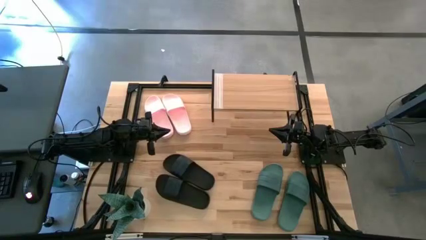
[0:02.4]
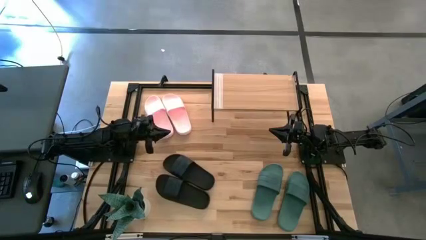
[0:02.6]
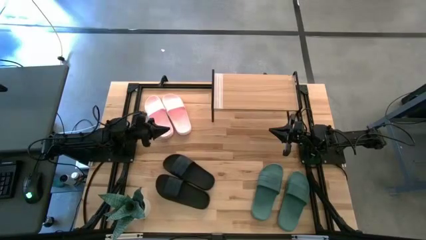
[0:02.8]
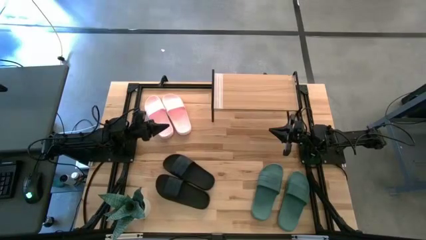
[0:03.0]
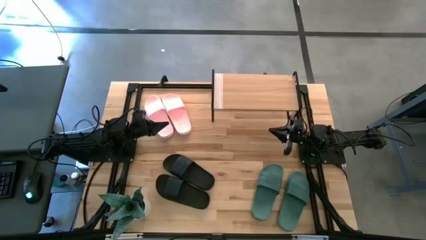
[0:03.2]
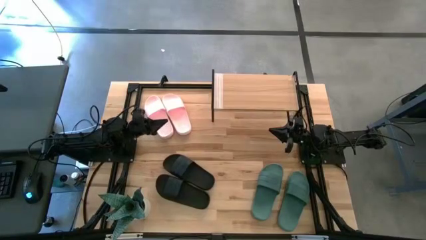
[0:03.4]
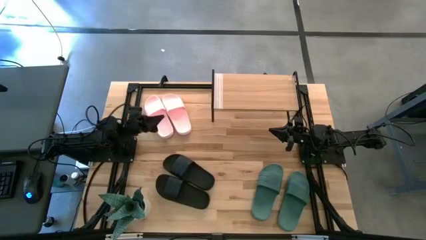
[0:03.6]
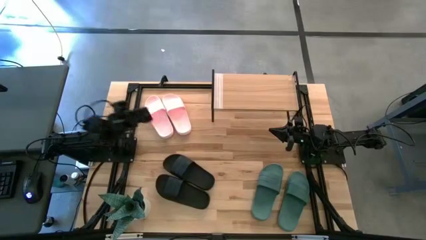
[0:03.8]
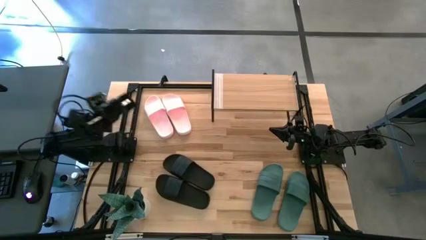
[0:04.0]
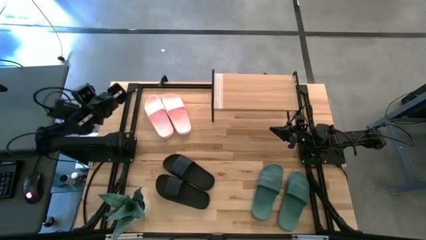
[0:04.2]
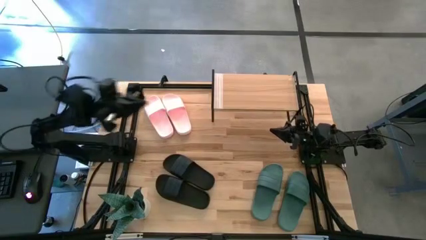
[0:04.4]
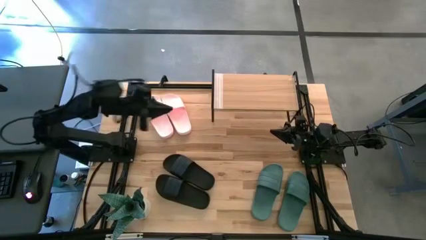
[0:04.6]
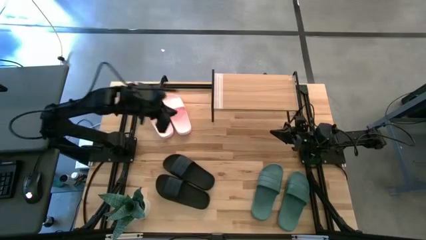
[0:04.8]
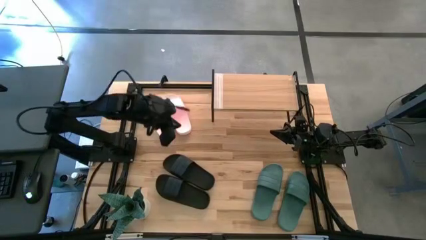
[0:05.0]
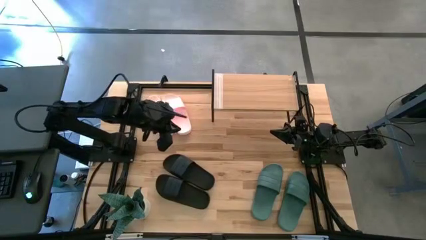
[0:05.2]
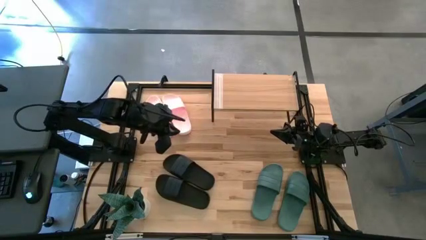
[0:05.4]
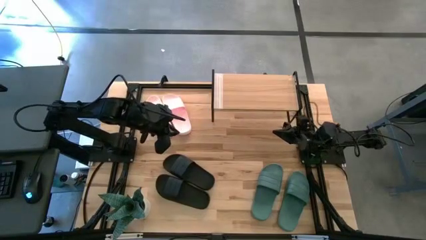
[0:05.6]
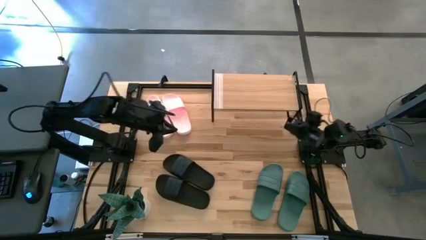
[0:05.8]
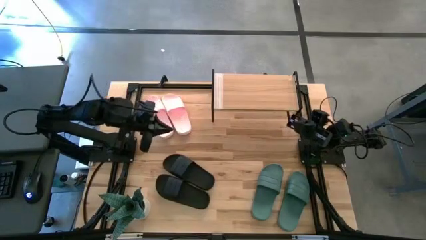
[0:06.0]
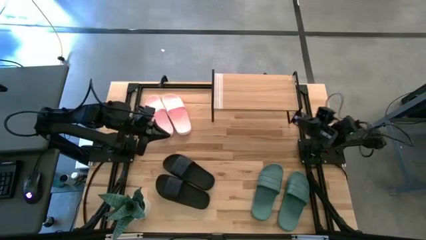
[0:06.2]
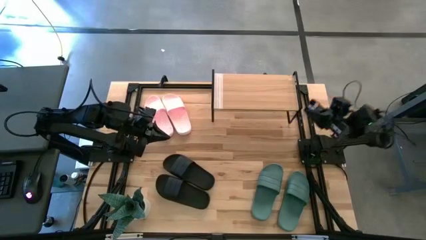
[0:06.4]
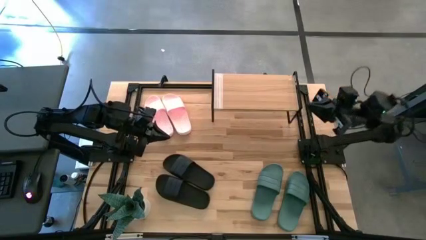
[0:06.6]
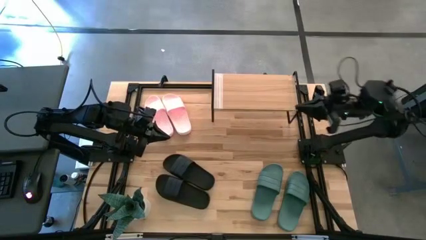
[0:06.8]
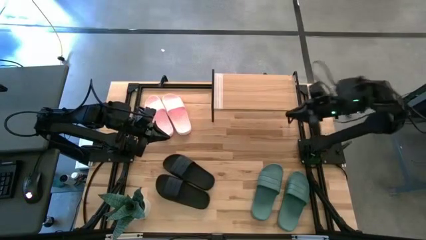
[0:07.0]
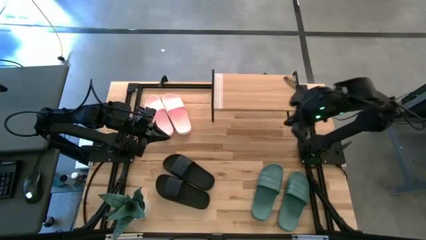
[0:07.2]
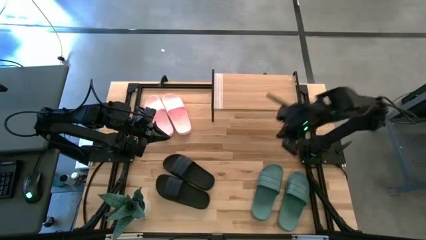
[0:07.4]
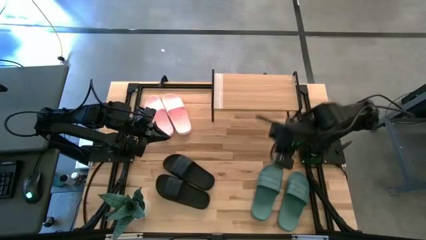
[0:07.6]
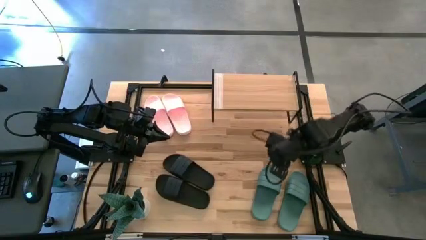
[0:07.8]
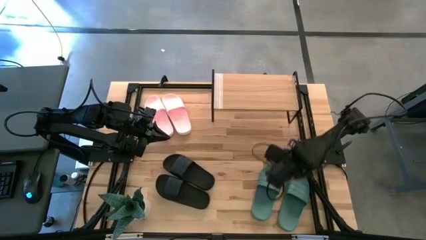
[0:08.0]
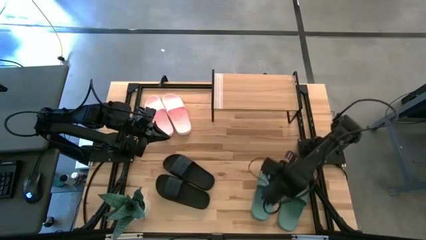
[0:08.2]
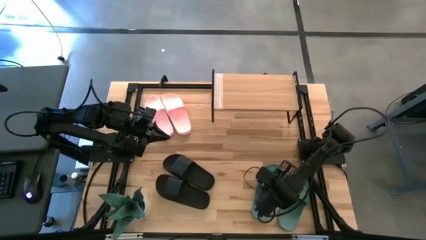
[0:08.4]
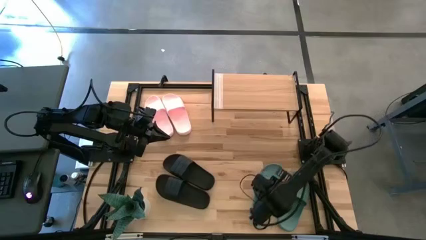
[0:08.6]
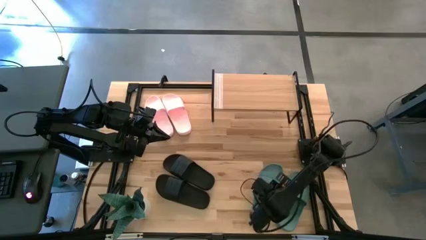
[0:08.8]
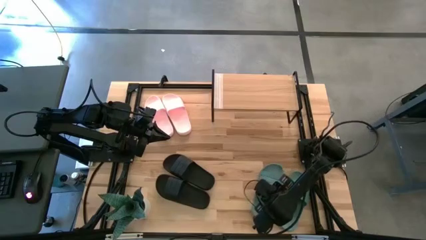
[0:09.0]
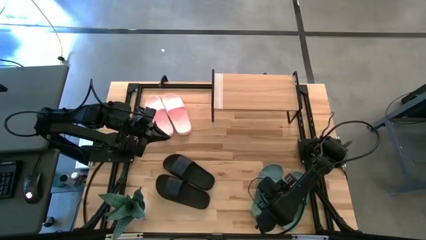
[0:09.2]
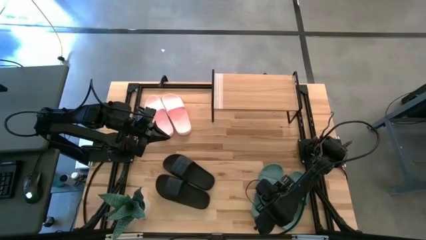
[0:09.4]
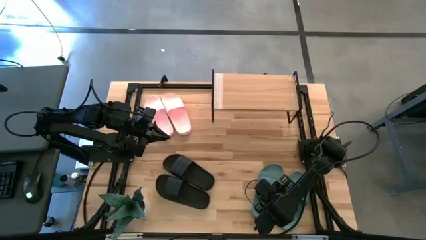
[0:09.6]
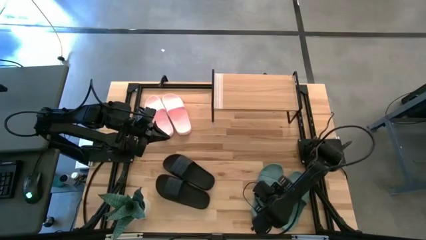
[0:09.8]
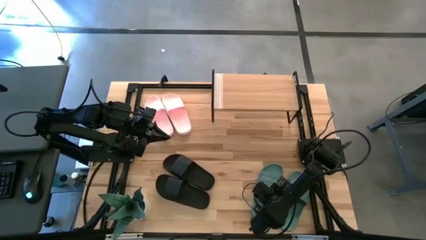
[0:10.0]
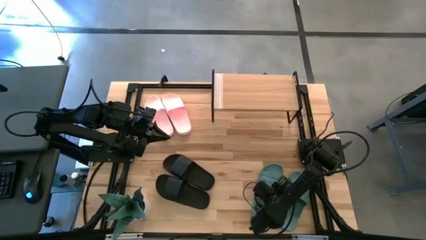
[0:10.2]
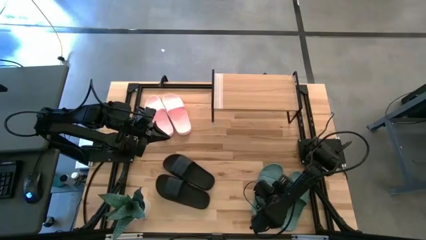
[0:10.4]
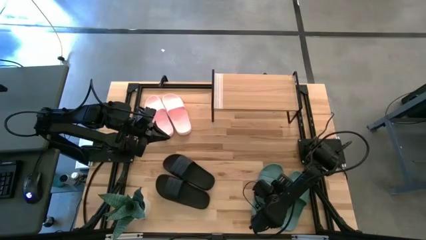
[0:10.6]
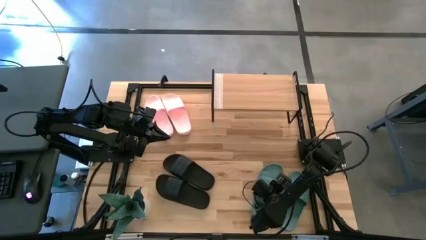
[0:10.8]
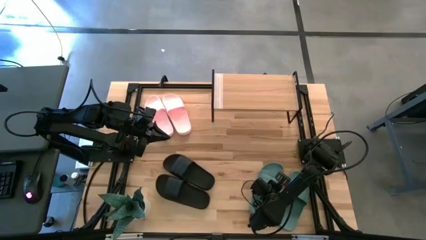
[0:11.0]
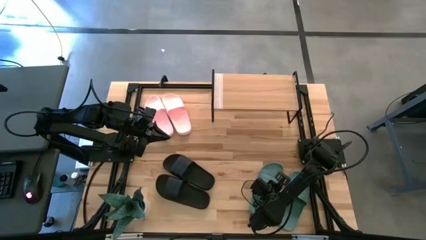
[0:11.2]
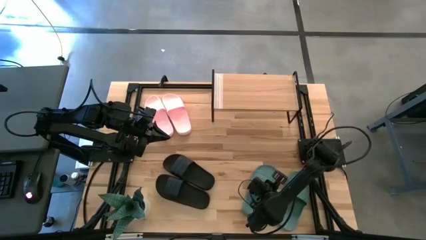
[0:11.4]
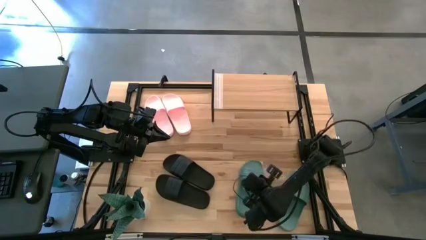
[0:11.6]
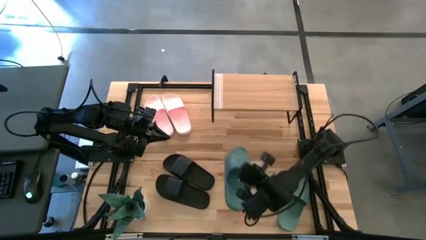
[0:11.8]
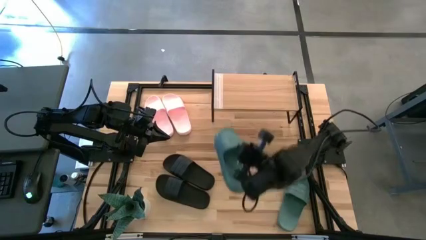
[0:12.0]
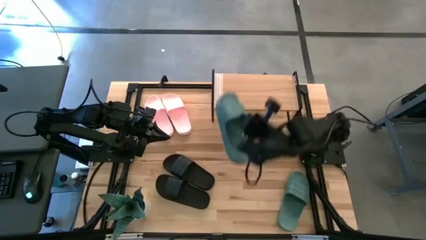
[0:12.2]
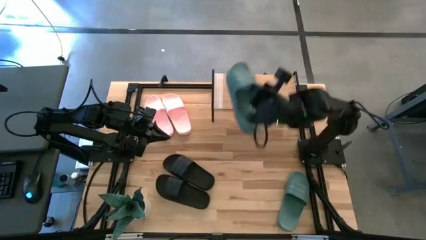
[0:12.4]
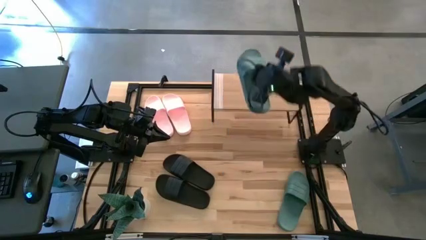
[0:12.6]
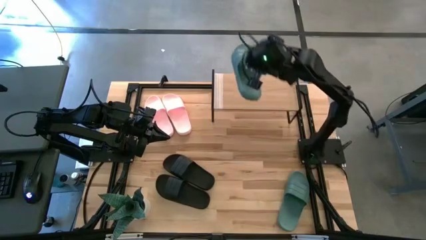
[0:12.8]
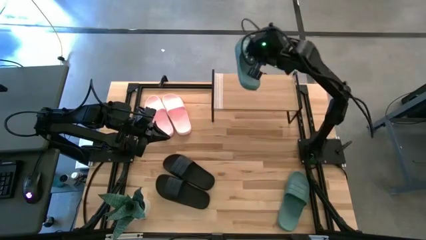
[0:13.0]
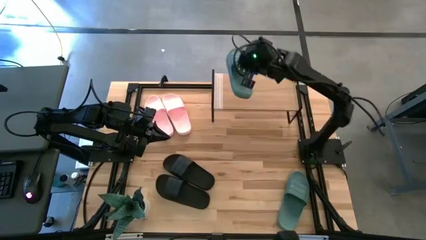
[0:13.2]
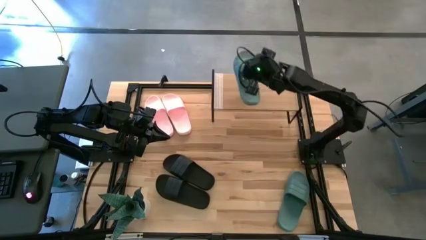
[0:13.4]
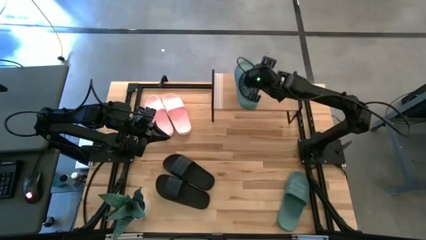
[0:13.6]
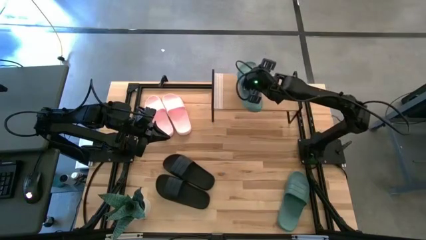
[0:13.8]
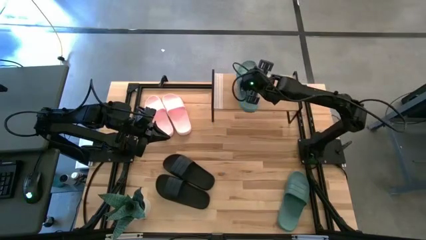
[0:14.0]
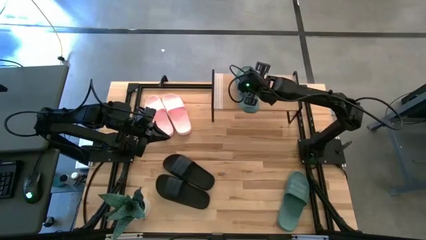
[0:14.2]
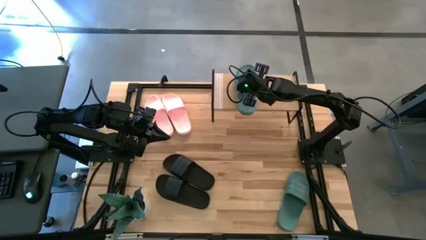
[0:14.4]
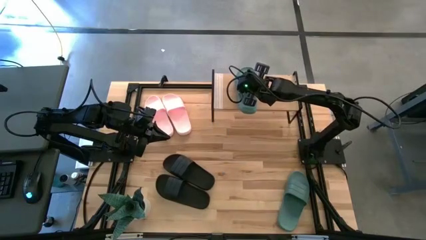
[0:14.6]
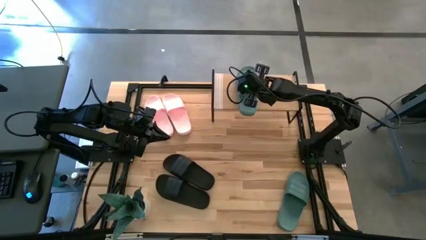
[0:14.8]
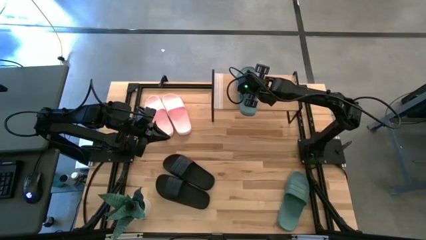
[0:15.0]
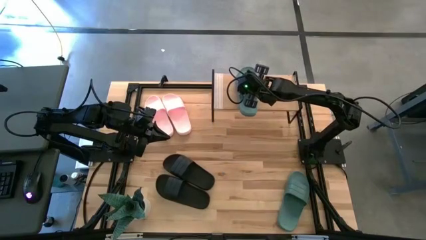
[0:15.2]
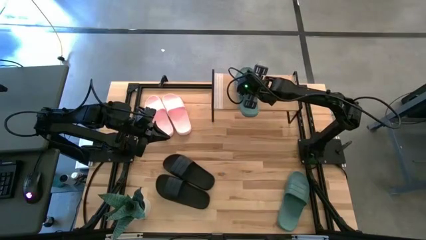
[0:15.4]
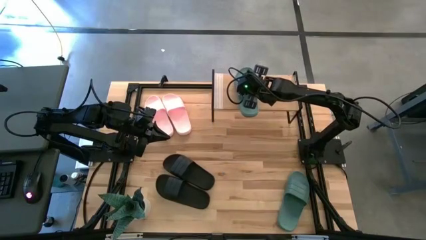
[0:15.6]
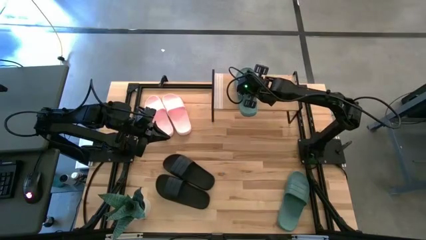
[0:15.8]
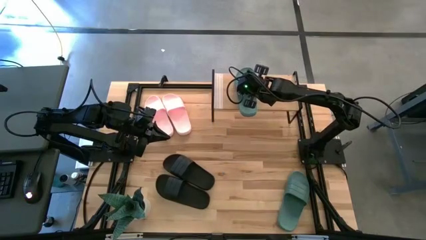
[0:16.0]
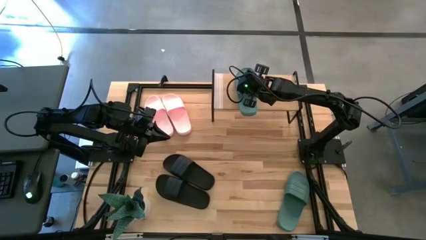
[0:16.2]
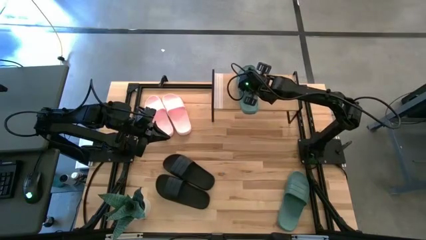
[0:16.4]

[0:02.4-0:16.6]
Task: Pick and place slides into the shelf
Put the left green slide on to the shelf
